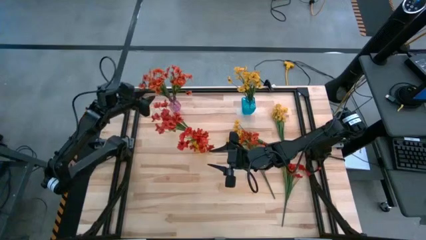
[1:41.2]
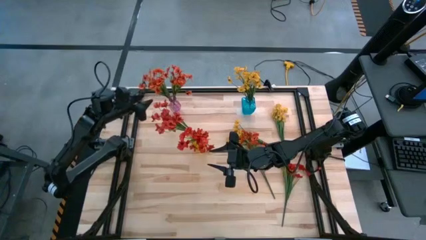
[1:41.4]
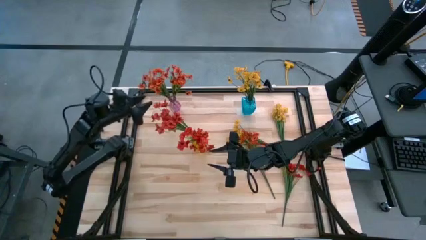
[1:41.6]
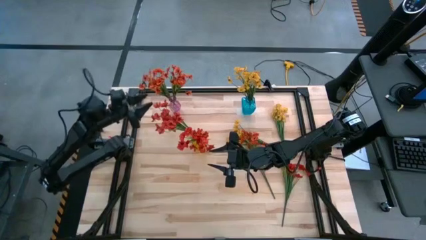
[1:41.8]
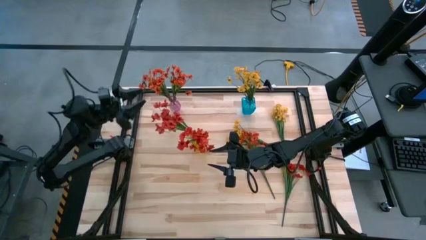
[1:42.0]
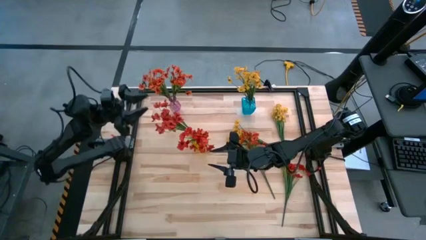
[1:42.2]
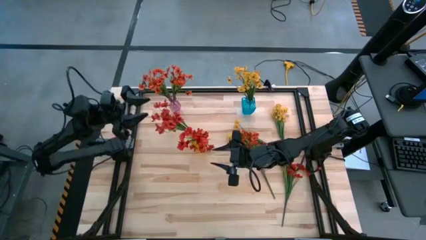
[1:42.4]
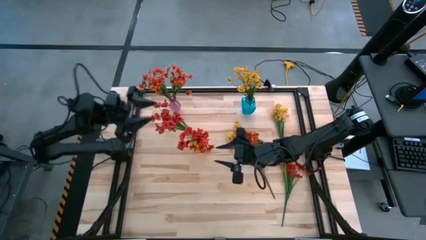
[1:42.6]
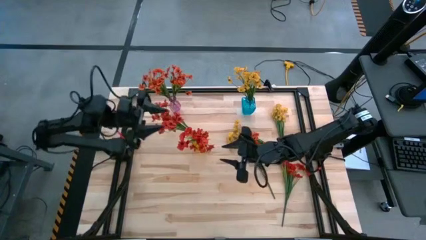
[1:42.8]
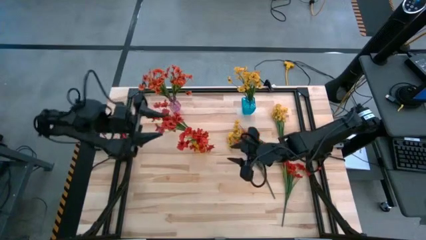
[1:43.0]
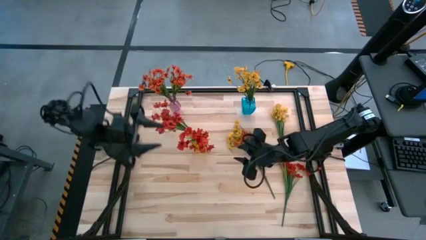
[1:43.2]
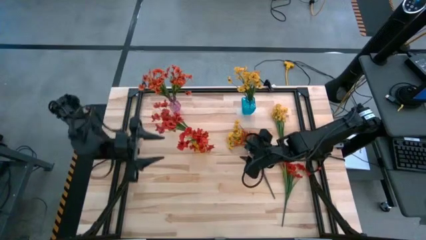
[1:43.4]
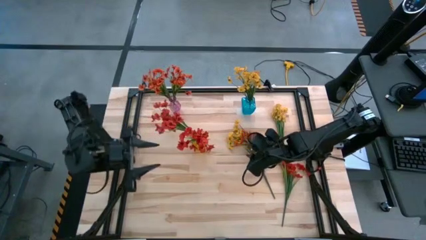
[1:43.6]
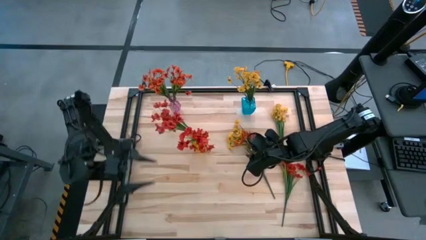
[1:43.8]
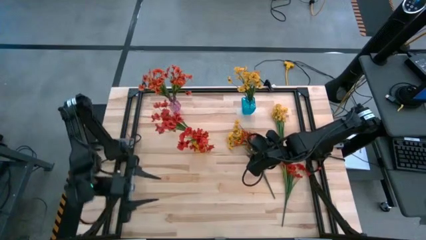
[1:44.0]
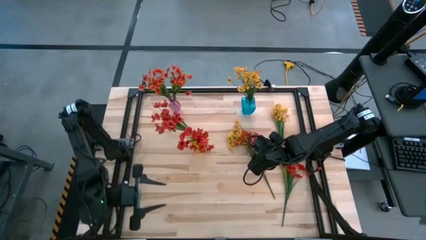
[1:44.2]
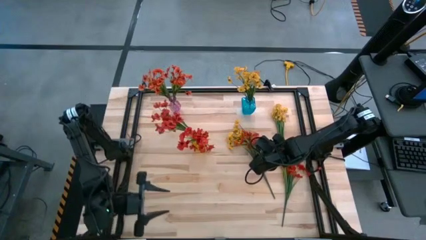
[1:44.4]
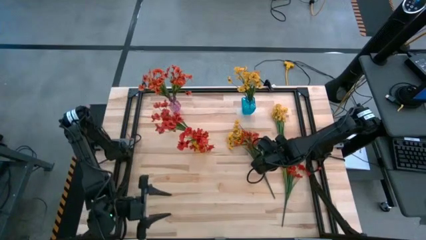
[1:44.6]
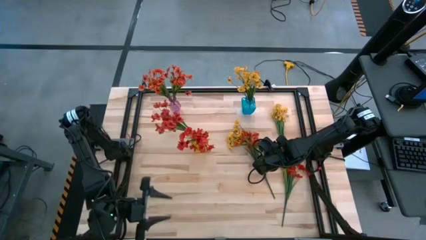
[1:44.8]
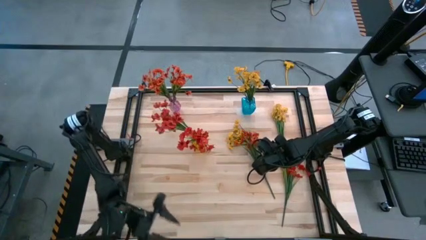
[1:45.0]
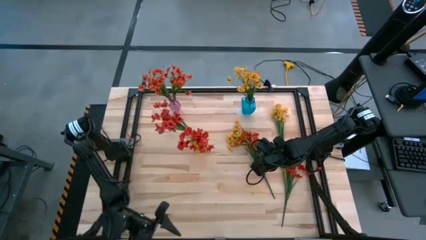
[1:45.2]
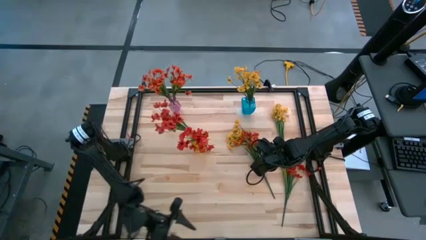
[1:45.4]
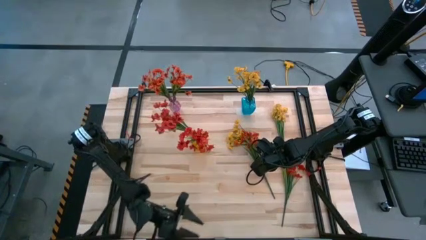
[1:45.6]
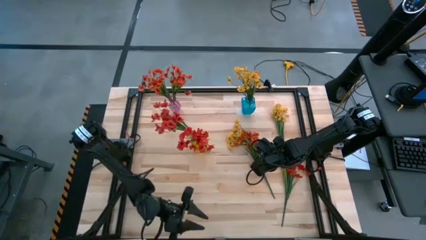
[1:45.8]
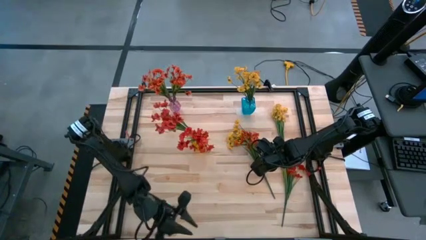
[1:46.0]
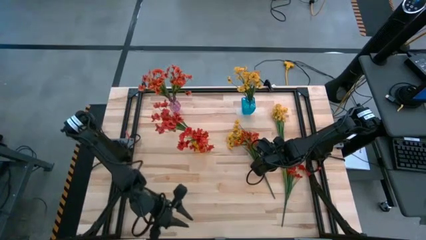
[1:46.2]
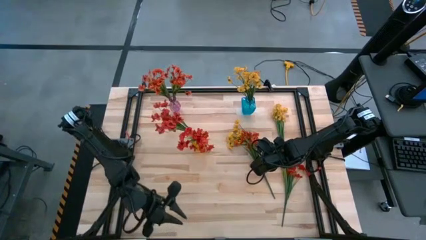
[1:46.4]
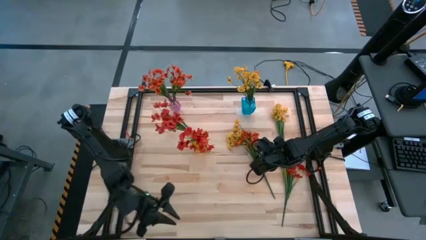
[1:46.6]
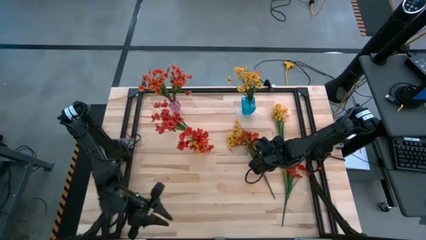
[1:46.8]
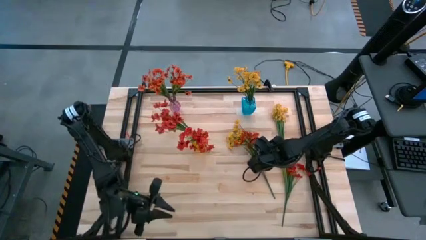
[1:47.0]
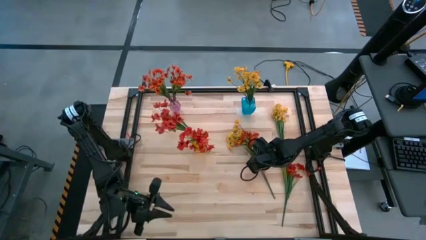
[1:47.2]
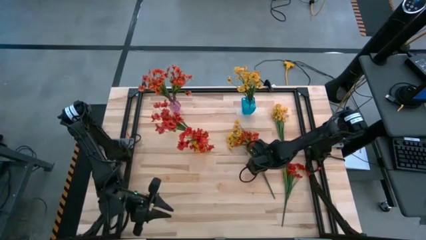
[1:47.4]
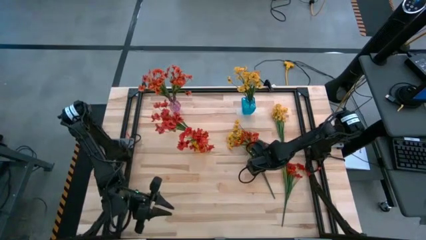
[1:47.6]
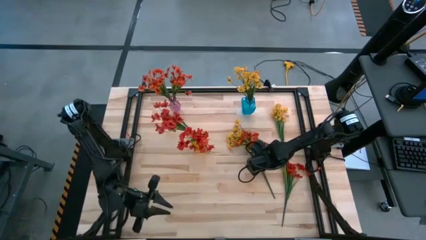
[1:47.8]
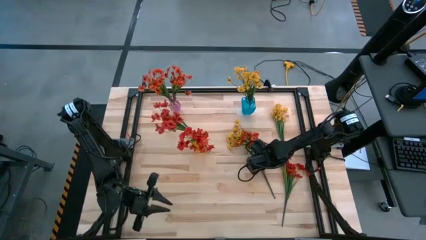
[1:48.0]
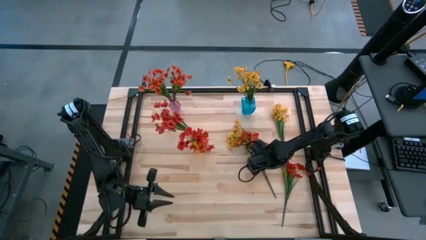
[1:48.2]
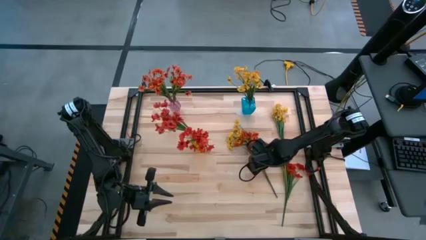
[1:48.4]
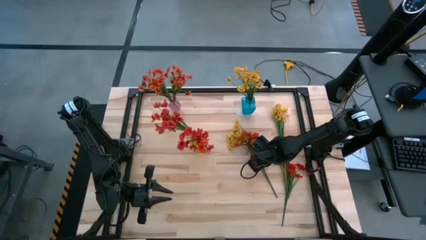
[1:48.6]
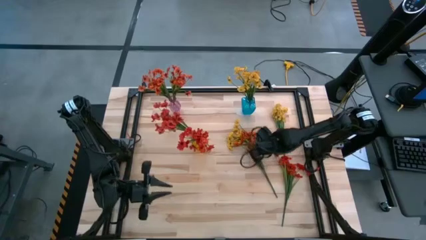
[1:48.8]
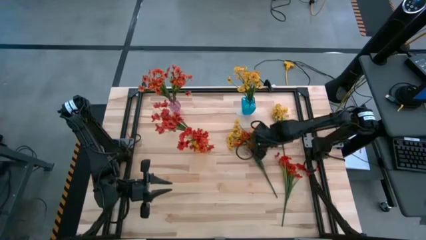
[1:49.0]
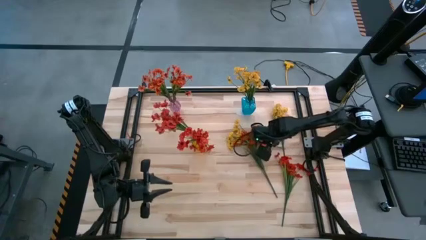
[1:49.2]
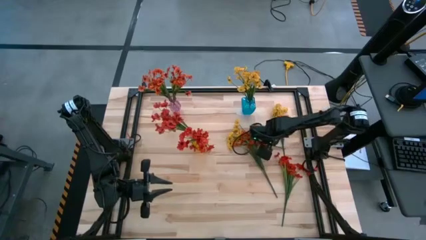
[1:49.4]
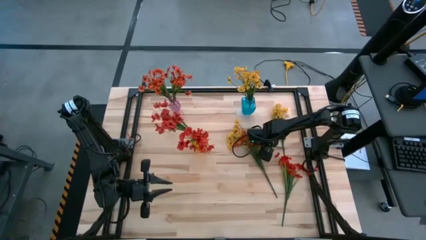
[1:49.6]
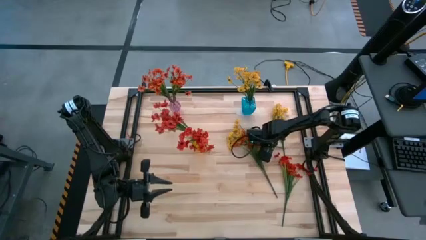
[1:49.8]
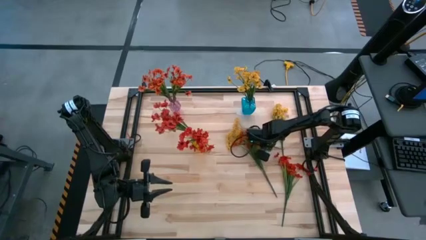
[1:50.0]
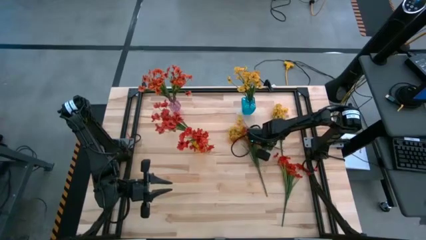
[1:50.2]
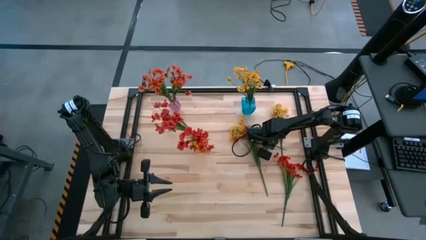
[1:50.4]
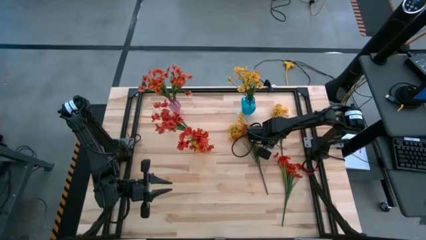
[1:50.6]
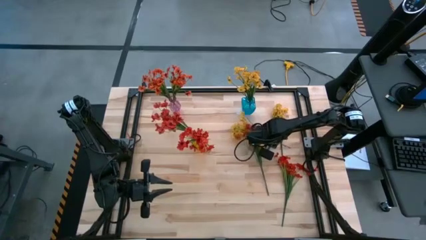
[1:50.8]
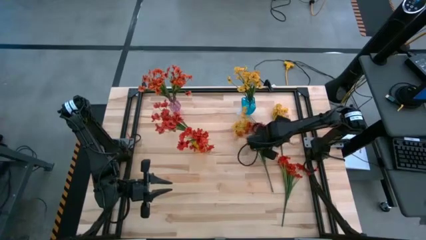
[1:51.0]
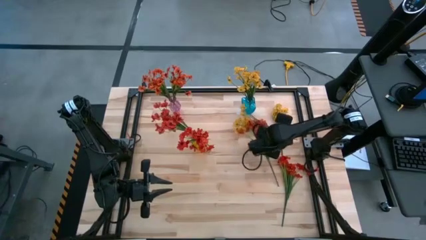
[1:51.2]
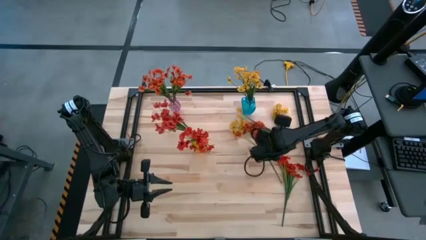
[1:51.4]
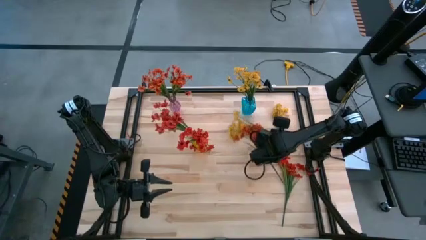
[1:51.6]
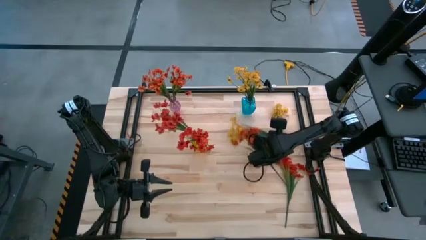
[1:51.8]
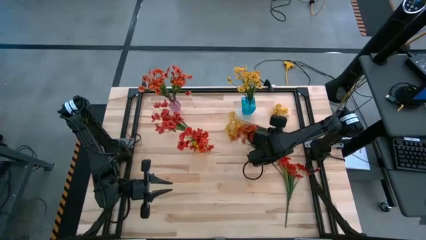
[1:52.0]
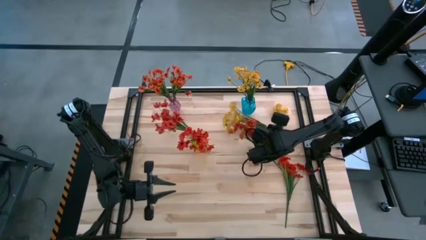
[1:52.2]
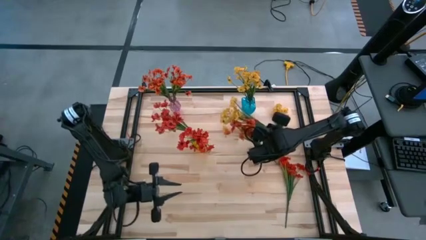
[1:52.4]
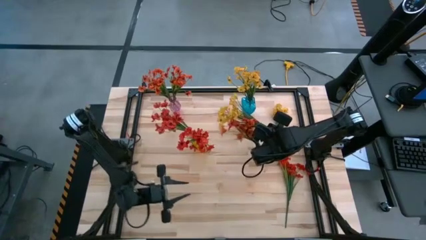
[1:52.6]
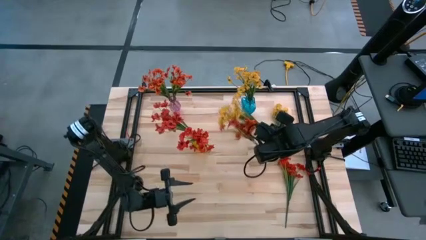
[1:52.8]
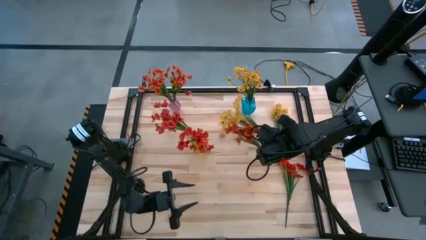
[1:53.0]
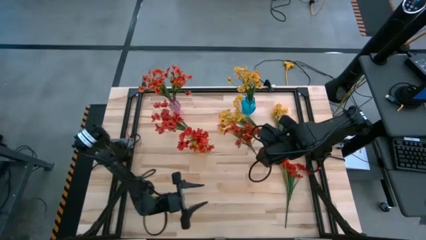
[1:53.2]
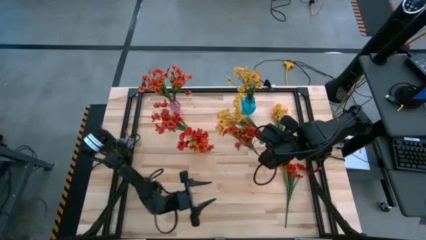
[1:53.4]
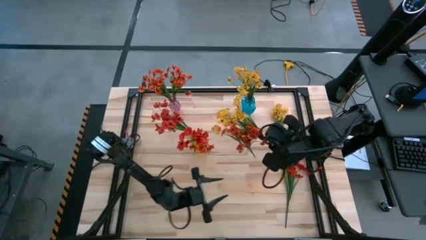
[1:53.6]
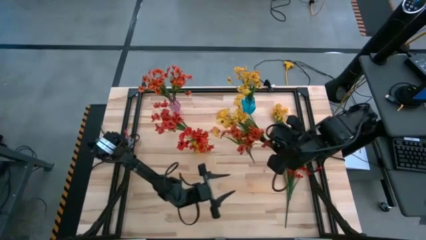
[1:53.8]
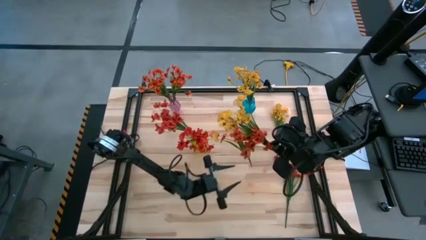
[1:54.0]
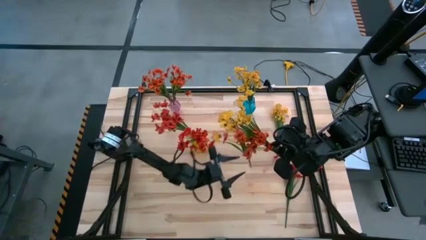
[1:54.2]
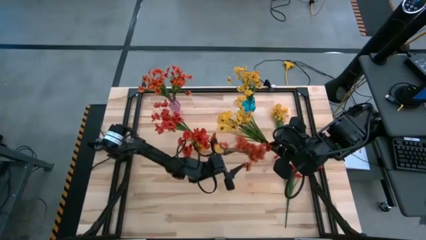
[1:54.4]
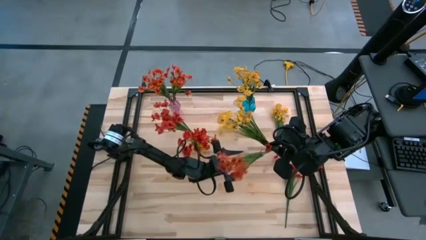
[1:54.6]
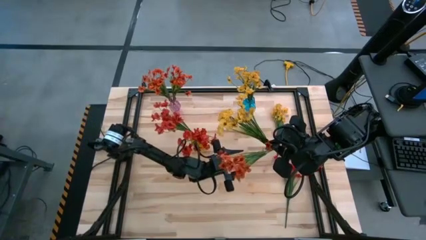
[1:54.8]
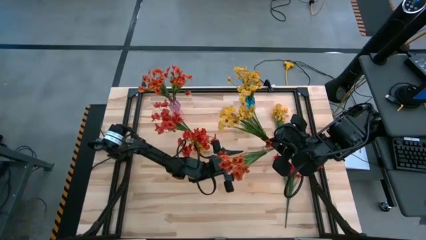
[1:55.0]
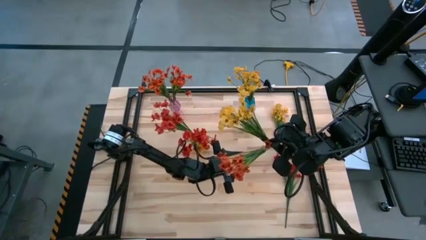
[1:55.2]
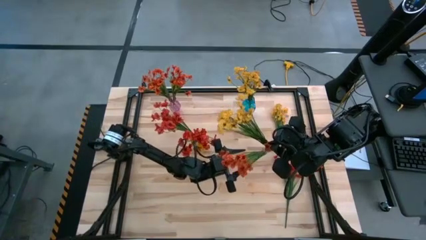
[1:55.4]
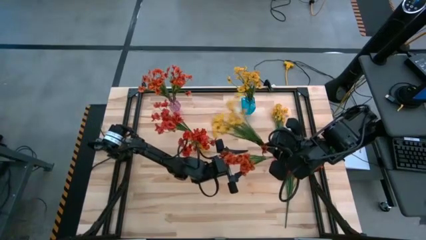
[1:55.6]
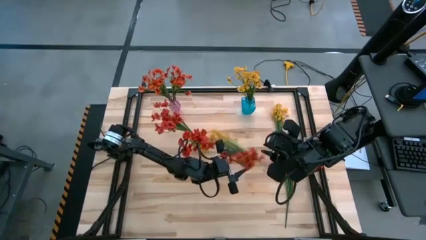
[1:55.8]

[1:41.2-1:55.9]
Task: Sort flowers into vase by color
Put the left yellow flower into the blue vase

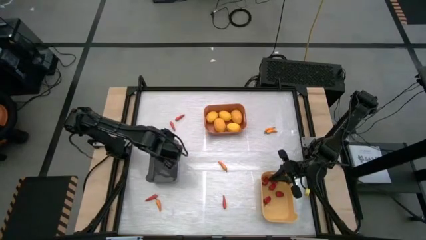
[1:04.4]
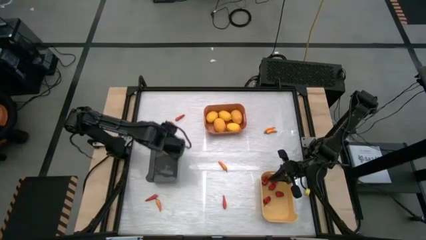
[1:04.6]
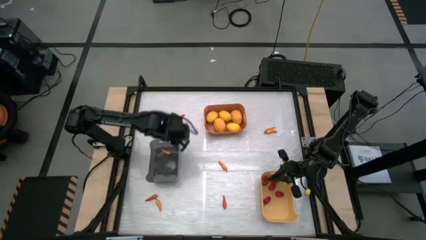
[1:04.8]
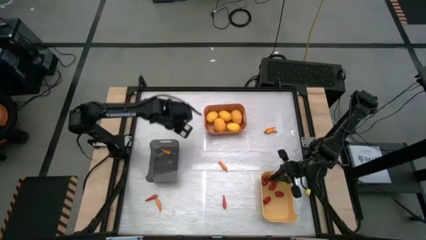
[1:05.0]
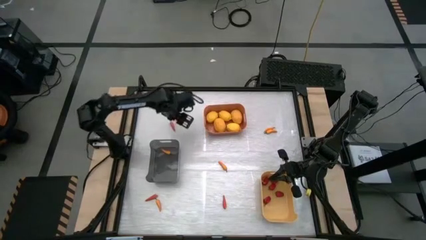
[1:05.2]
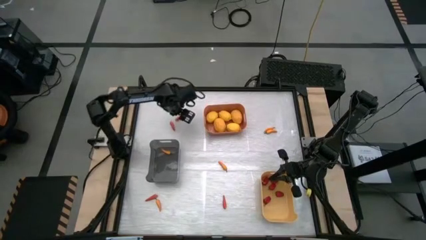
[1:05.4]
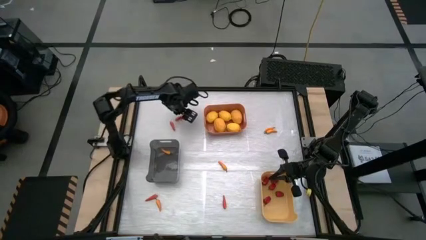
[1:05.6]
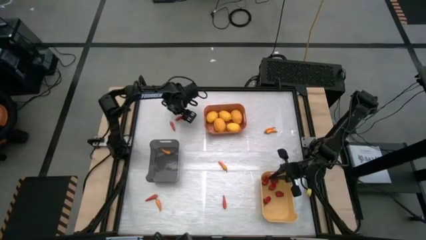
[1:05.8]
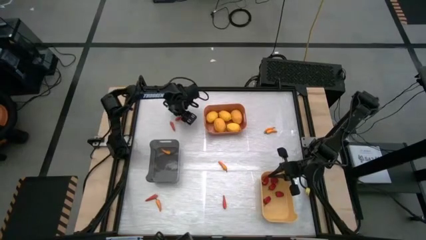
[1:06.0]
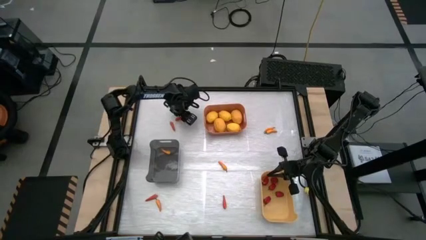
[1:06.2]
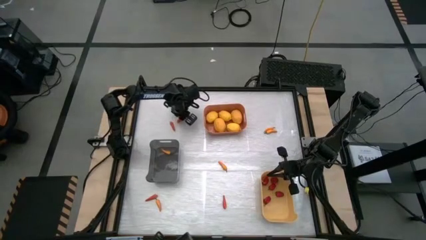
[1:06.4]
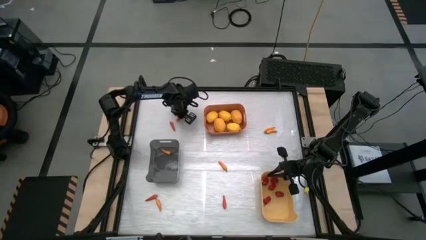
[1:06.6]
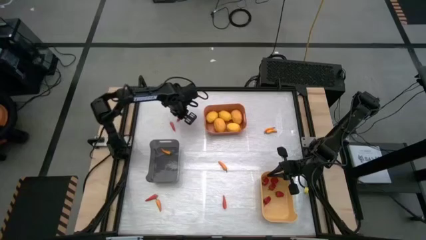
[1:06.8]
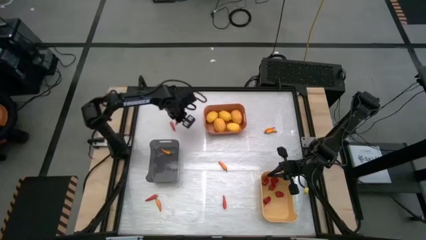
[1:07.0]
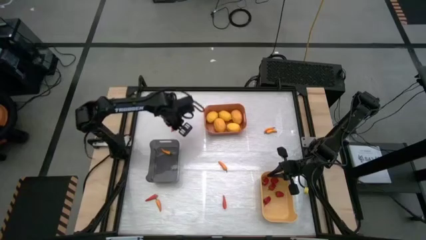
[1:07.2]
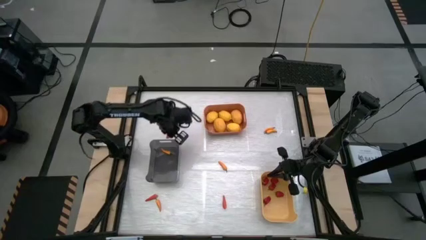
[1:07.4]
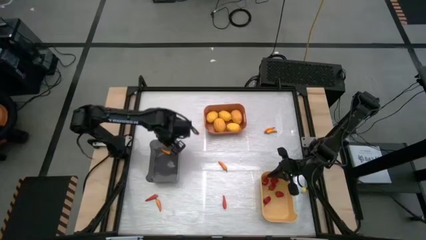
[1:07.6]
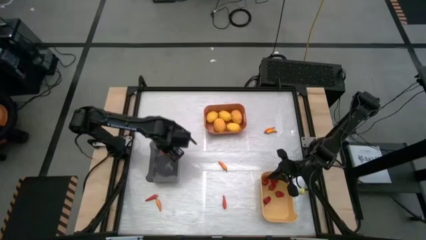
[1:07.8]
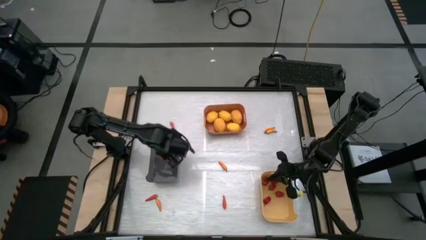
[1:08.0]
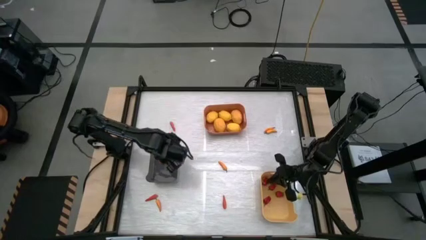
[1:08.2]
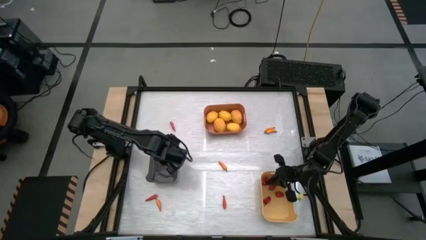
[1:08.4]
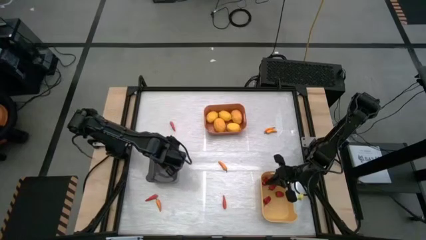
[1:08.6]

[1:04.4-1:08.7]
Task: Sort produce into baskets
Put the orange chili pepper into the black bin
